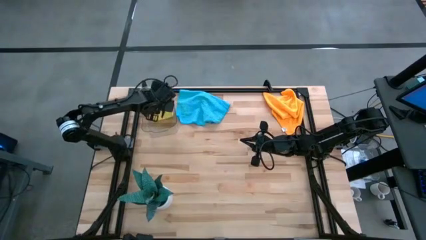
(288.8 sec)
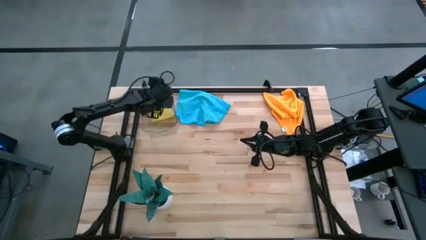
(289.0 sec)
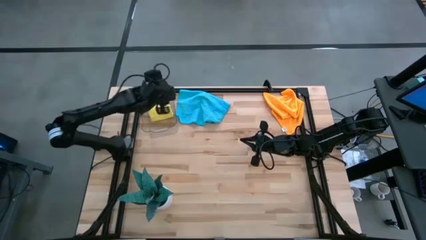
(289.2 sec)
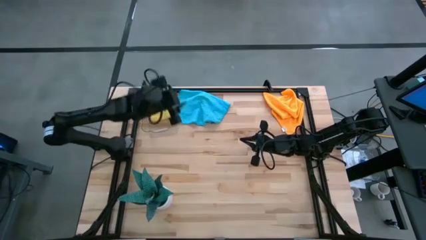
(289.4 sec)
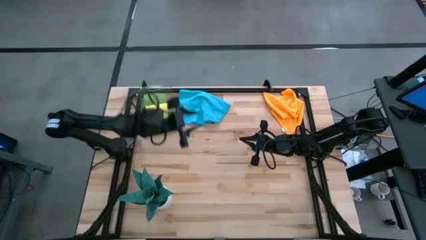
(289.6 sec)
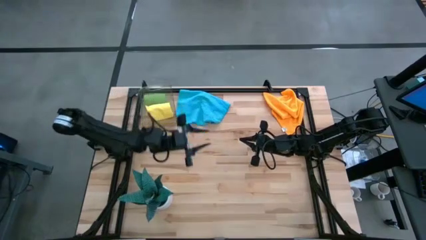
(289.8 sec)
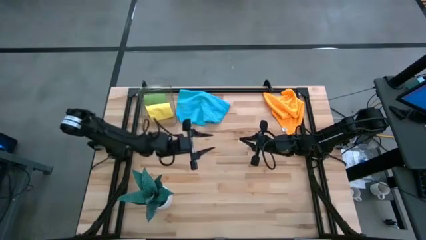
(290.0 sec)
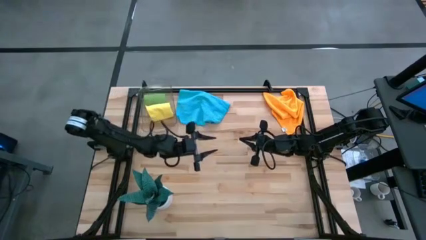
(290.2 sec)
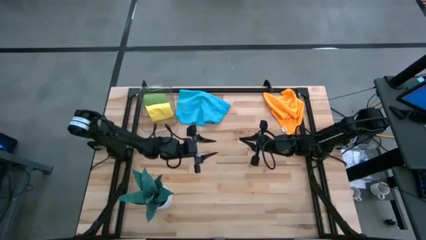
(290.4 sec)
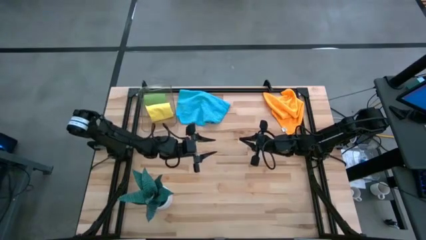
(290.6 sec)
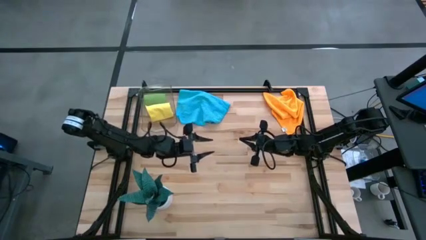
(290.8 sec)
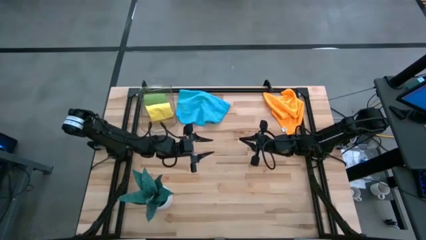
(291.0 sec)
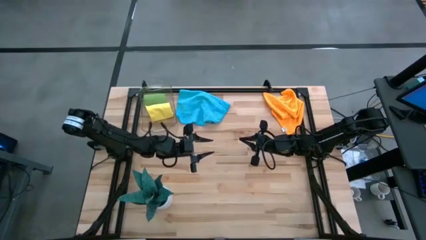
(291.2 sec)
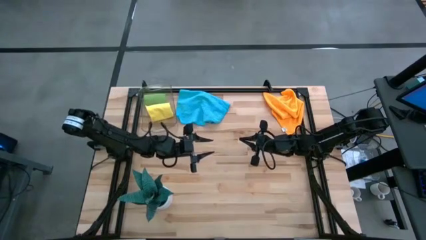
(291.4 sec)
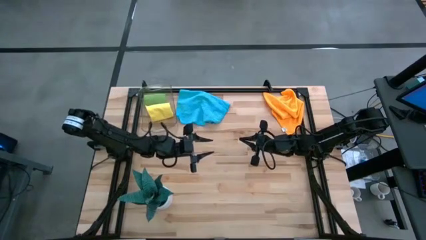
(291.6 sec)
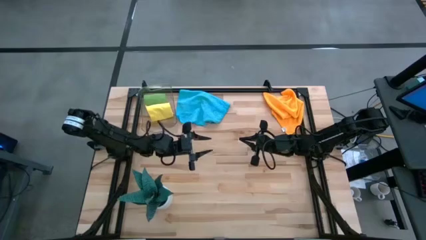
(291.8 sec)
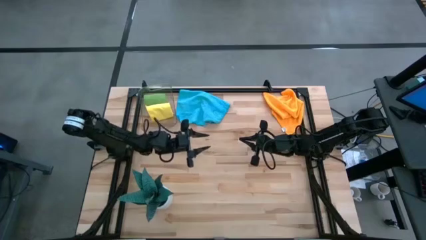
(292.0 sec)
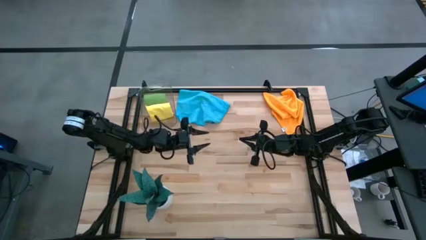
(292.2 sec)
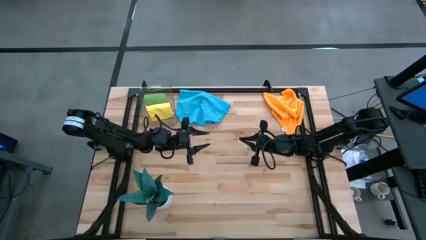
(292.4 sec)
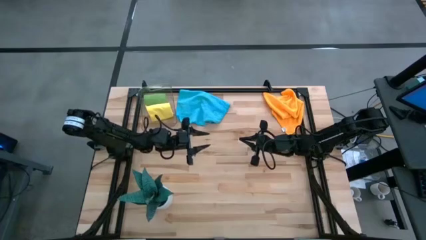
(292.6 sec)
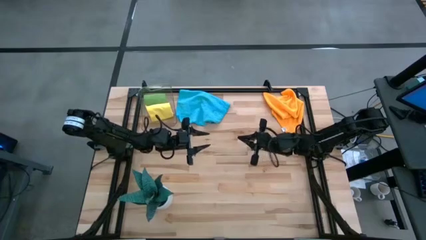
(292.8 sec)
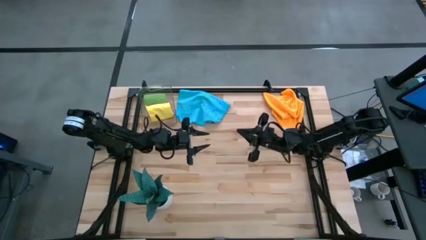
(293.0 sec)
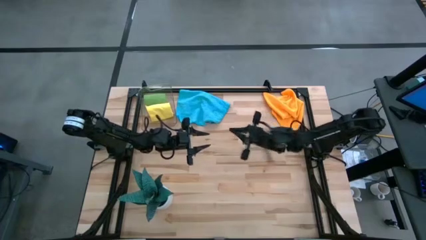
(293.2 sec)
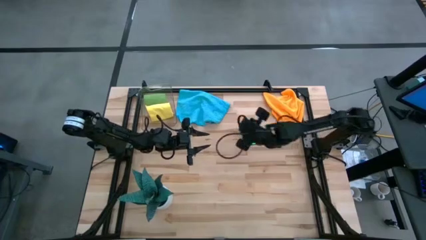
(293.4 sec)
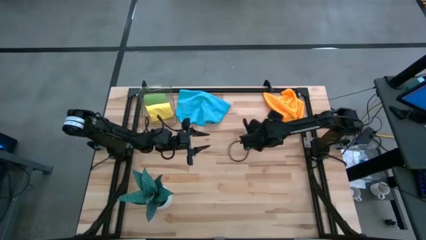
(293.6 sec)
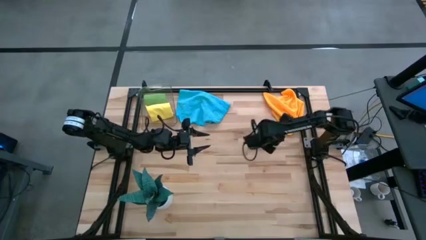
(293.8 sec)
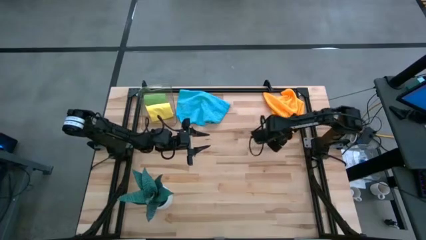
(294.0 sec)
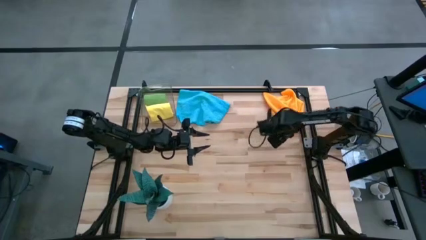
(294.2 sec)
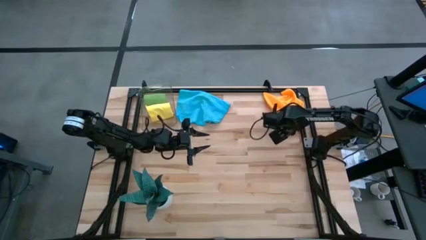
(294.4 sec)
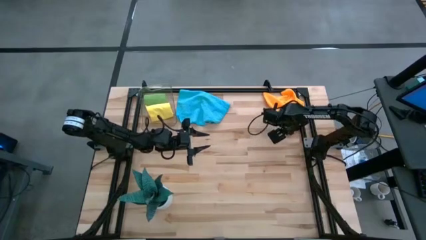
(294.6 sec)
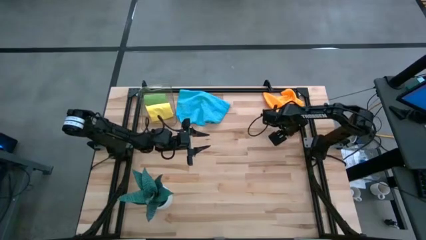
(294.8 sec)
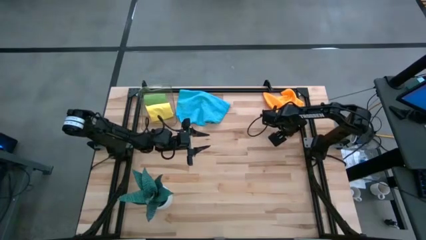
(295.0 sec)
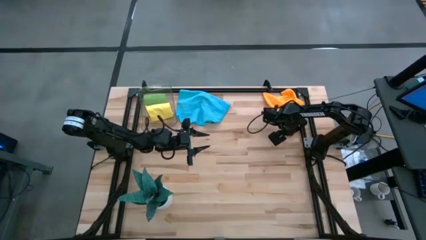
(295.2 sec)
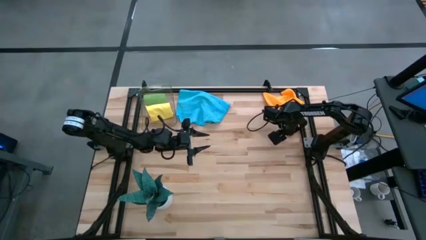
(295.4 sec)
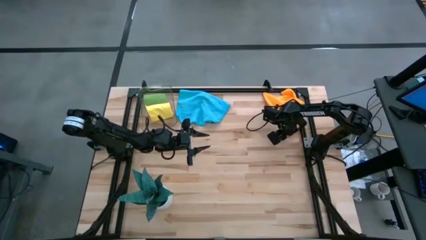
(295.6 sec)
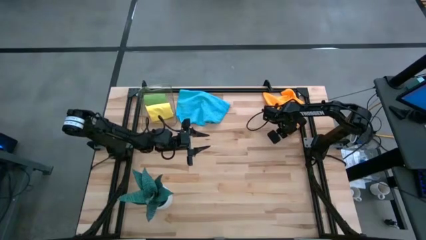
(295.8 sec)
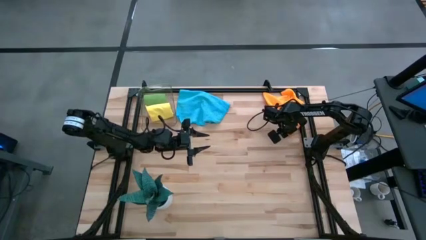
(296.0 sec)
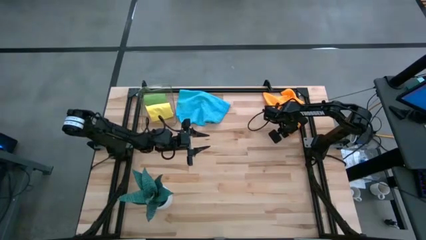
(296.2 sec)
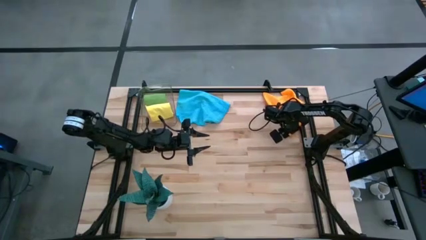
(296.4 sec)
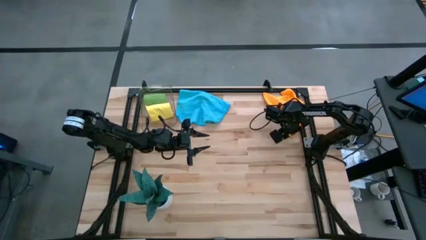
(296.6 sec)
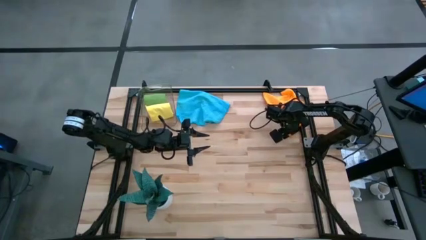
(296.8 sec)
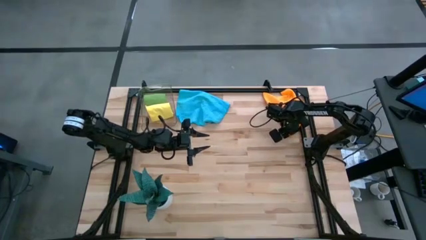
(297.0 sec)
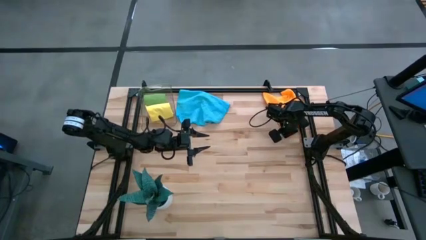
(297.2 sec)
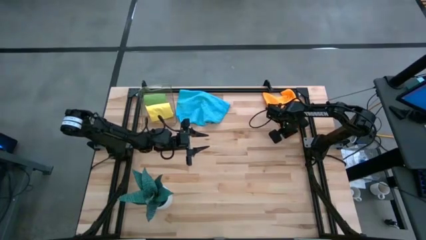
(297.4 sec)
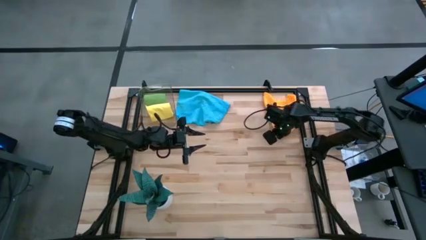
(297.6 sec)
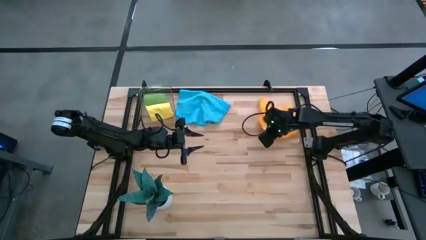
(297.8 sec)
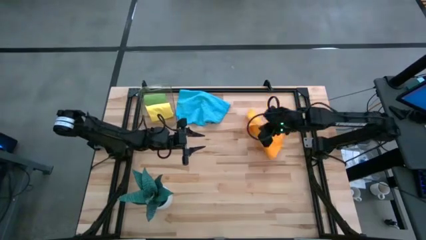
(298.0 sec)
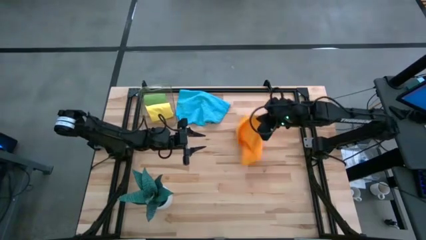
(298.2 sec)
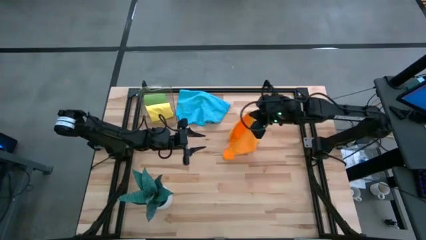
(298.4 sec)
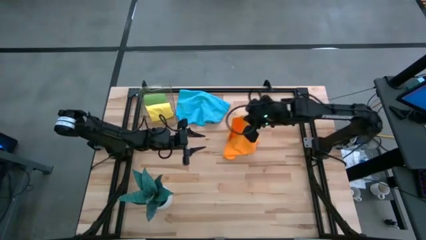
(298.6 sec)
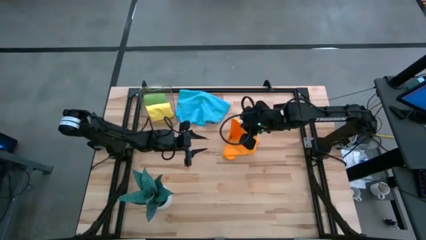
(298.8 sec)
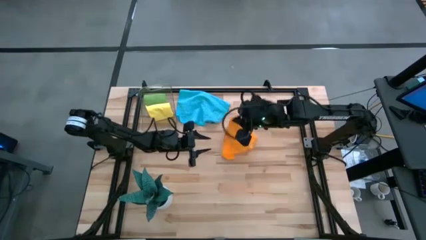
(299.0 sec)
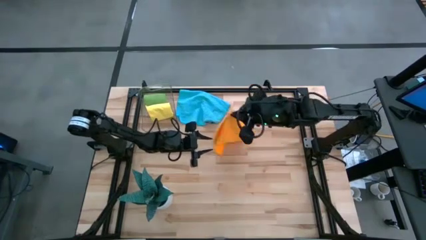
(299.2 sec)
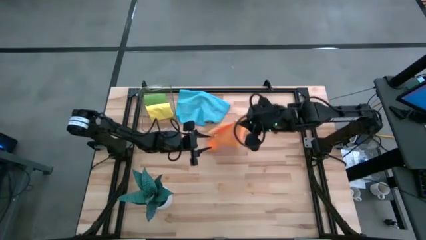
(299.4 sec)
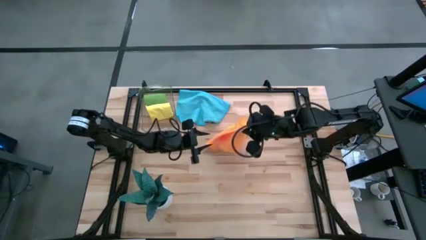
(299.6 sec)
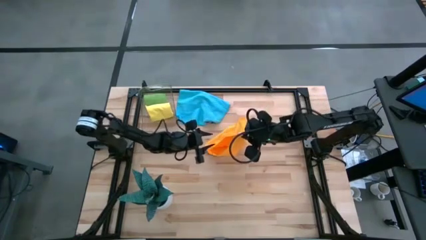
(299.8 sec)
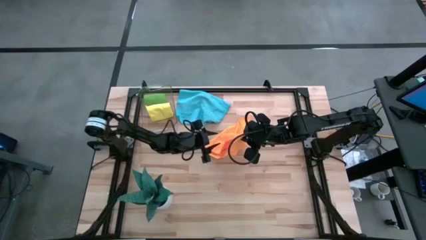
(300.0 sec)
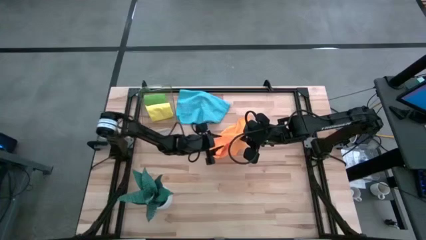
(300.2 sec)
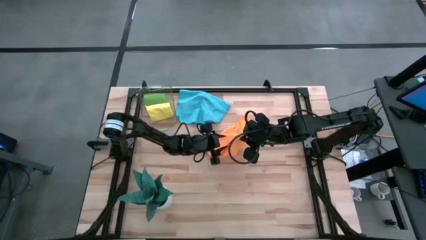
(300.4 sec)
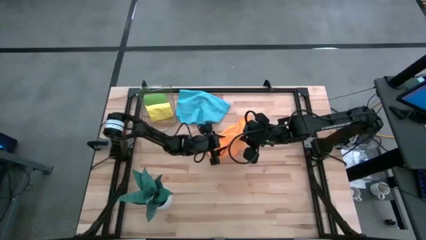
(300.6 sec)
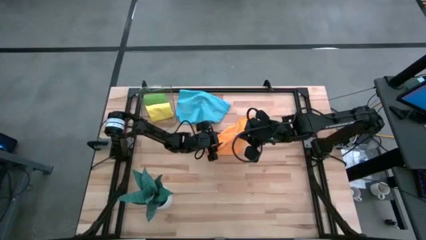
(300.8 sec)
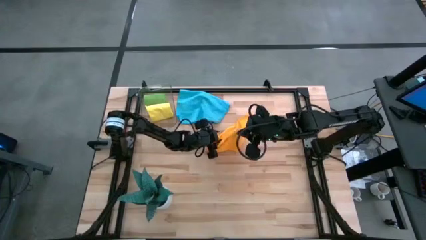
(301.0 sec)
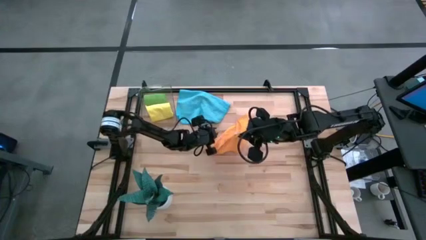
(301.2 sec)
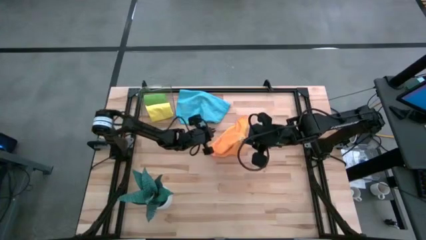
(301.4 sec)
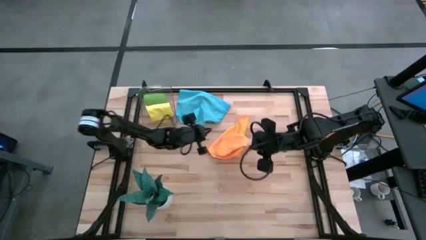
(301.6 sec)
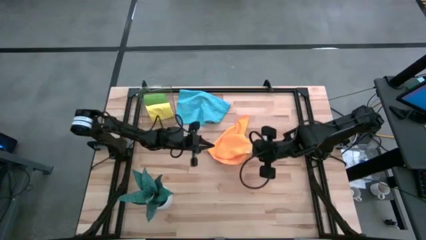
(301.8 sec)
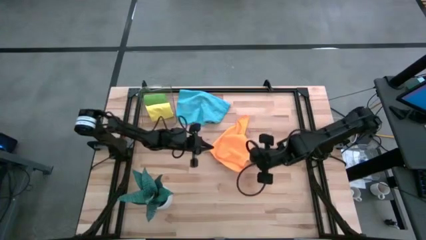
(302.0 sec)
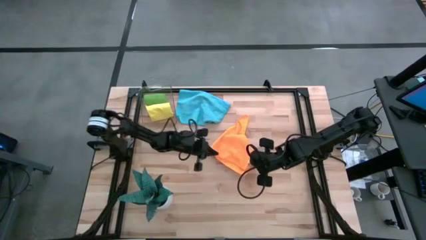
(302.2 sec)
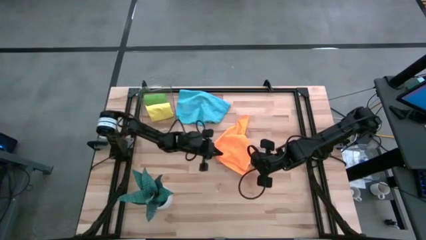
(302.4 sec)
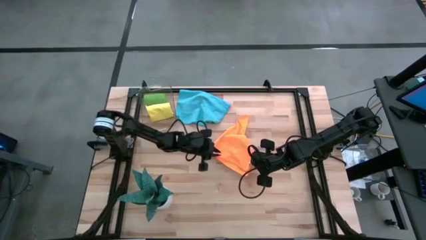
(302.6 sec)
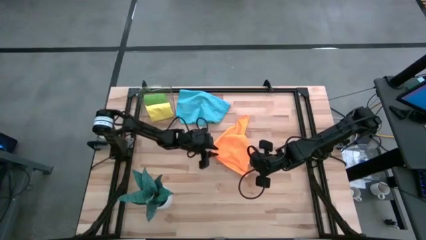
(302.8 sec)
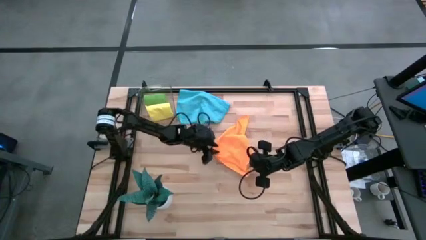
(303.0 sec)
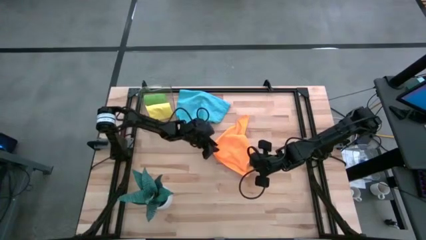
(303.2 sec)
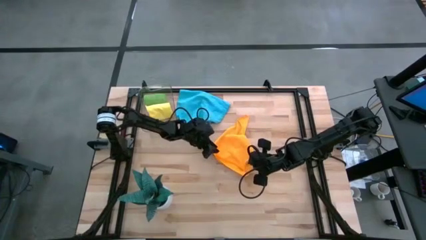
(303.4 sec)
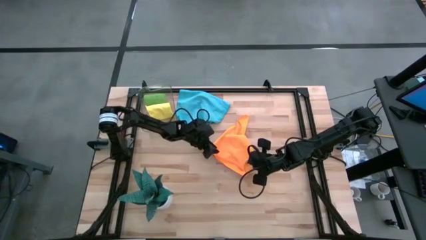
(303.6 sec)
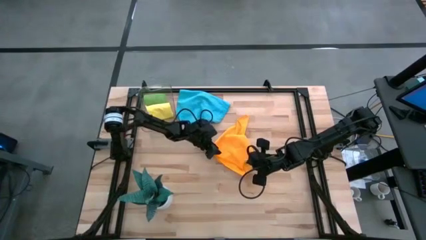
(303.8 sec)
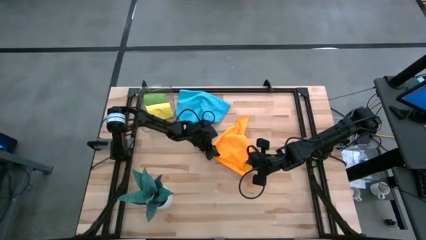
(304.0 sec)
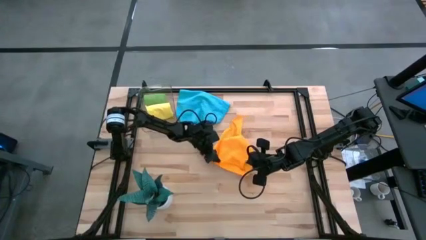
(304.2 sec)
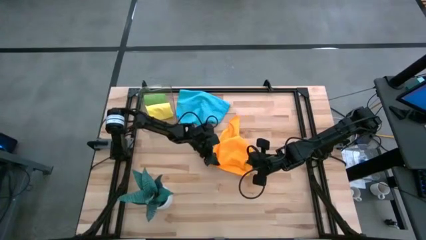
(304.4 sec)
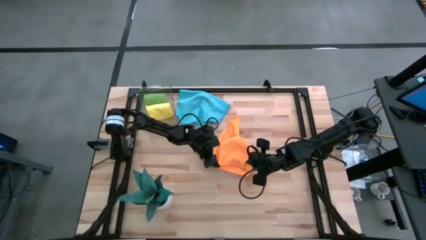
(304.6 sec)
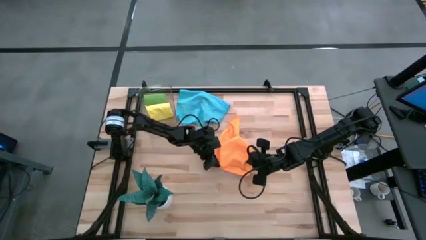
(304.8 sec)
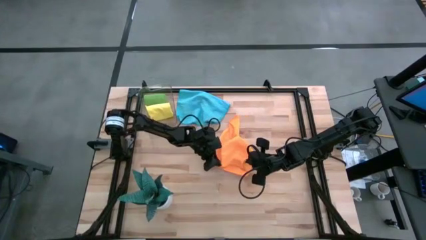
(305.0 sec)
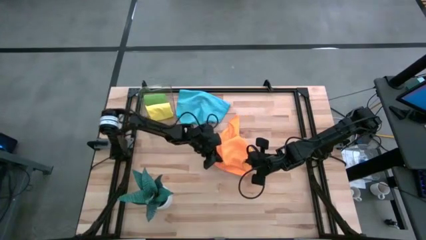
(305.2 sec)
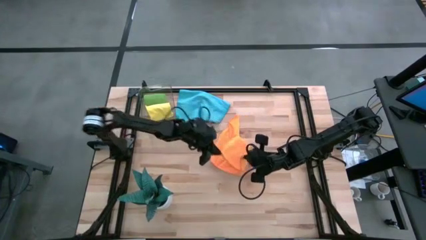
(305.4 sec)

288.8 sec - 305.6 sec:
Task: Roll microfiber towels into tight, uniform cylinder then place into a basket
Fold the orange microfiber towel
